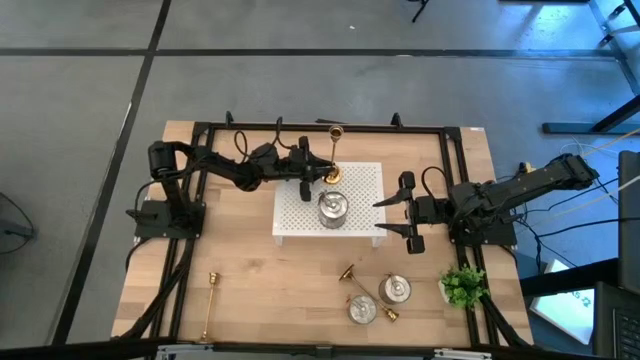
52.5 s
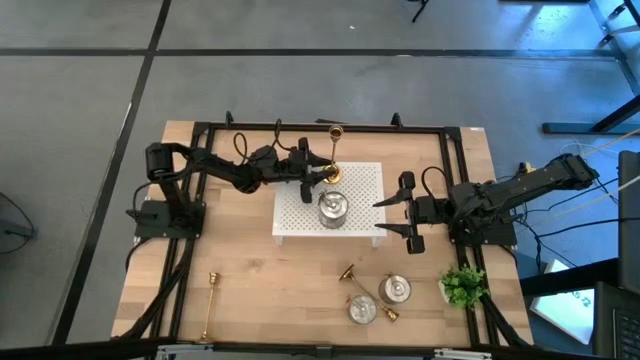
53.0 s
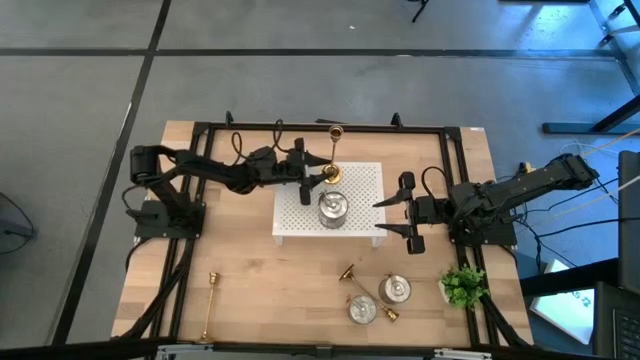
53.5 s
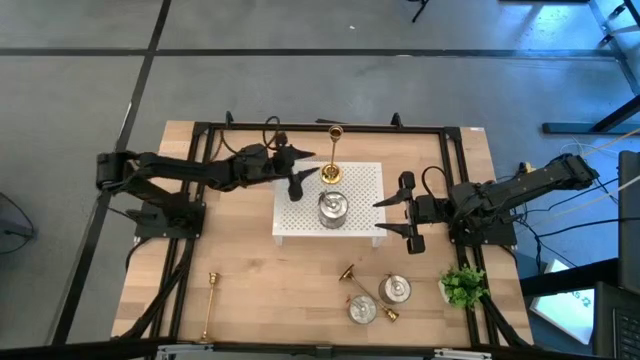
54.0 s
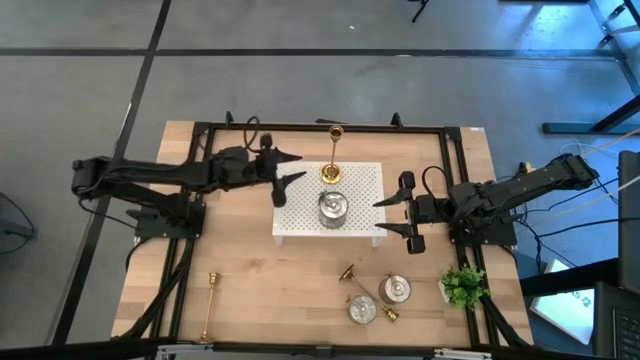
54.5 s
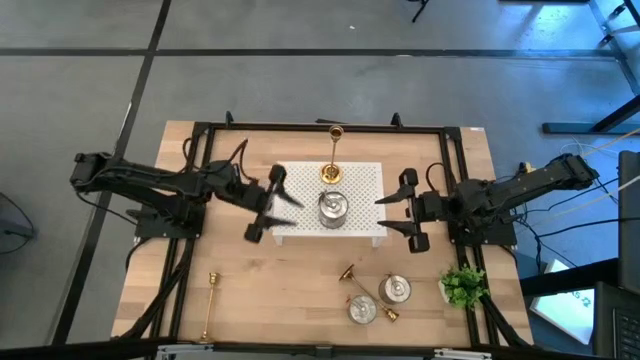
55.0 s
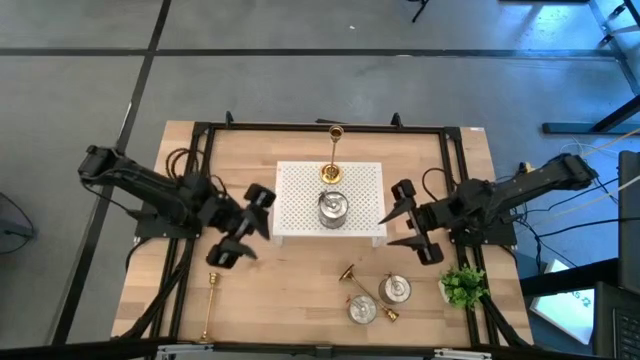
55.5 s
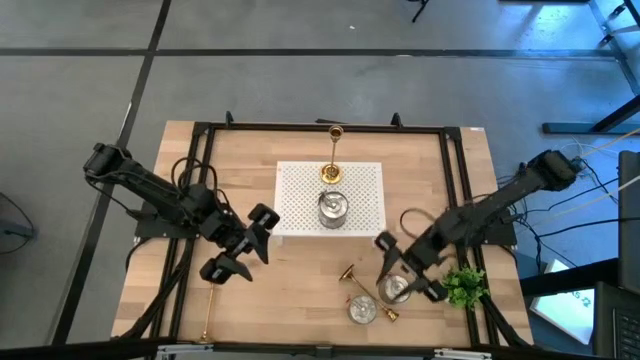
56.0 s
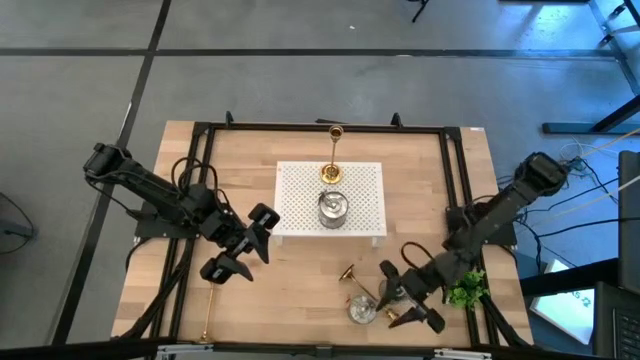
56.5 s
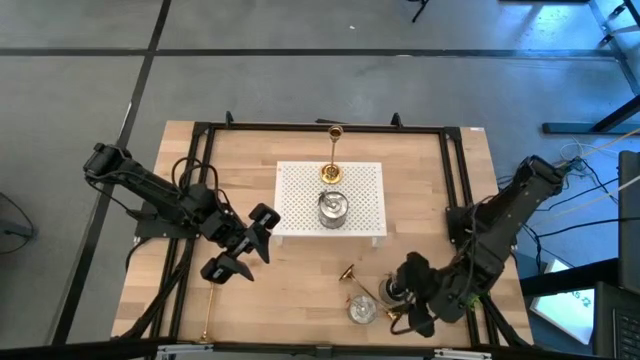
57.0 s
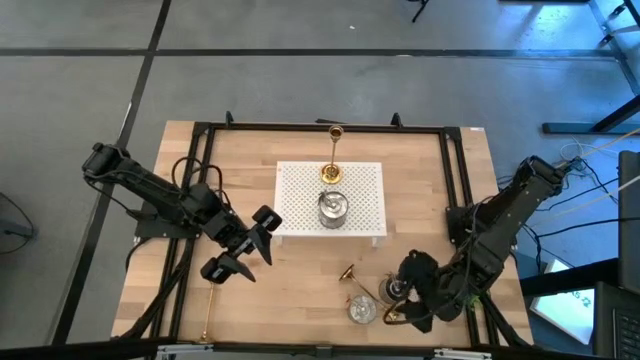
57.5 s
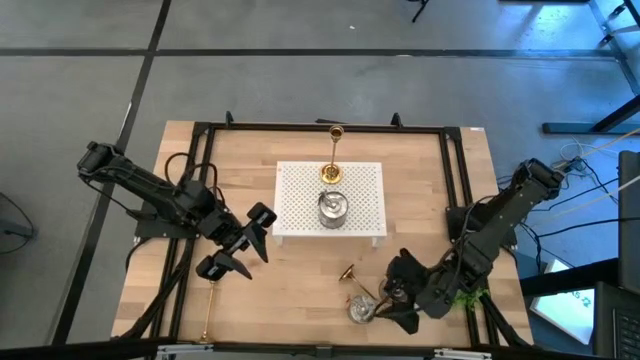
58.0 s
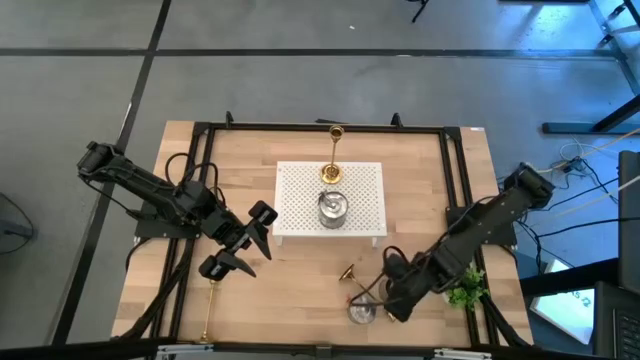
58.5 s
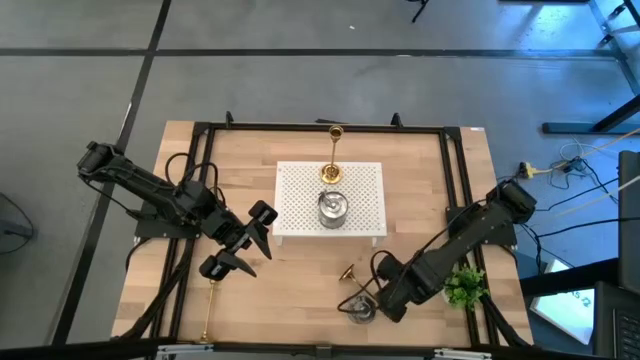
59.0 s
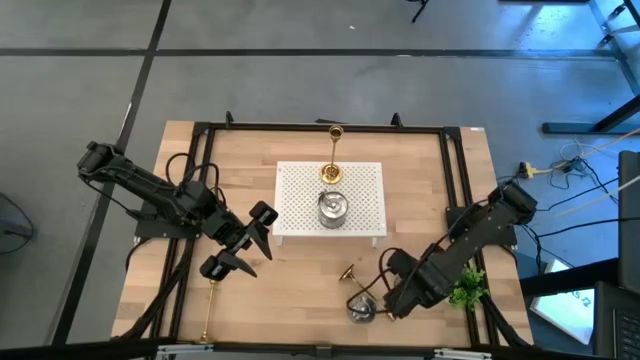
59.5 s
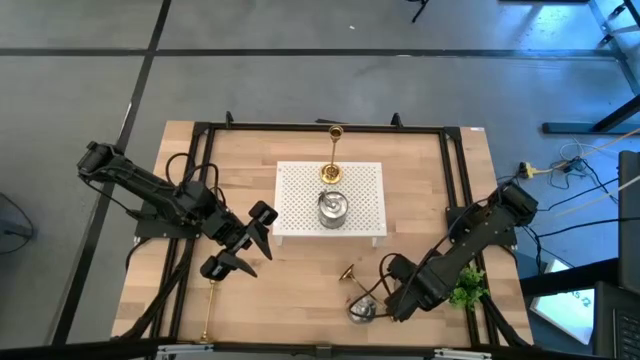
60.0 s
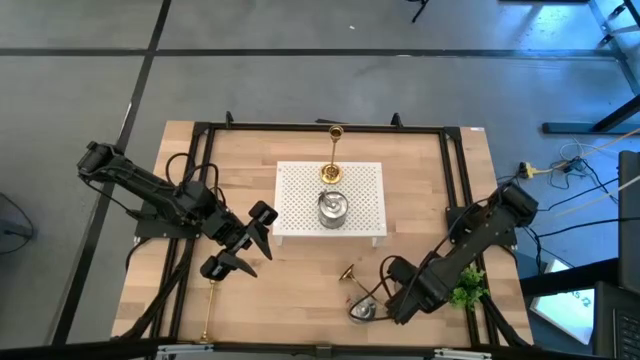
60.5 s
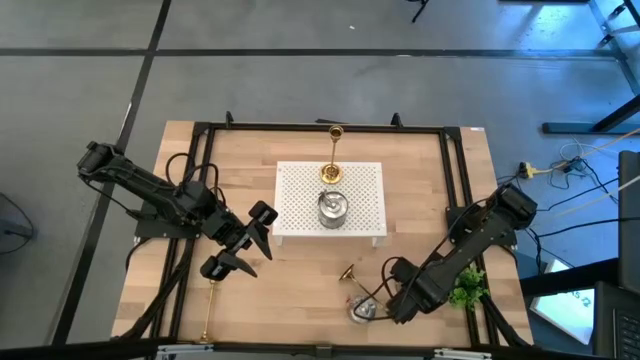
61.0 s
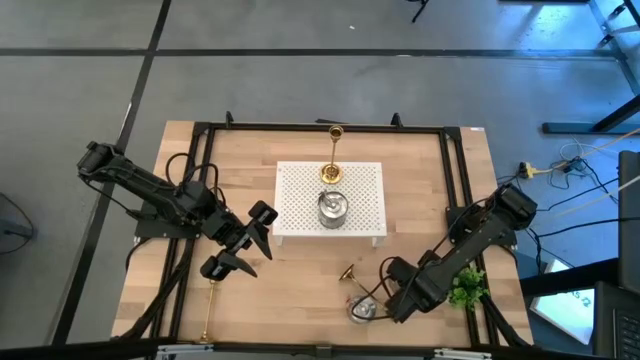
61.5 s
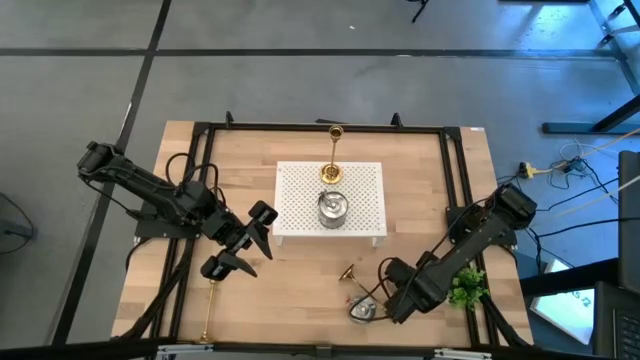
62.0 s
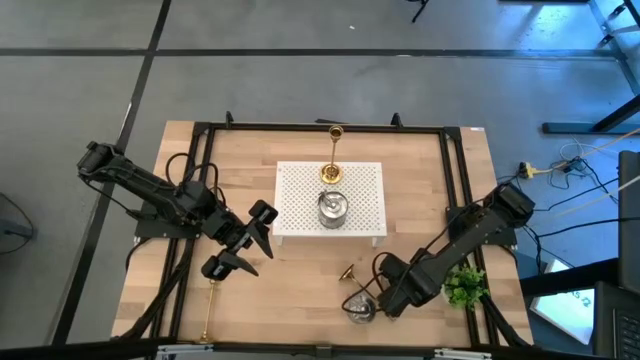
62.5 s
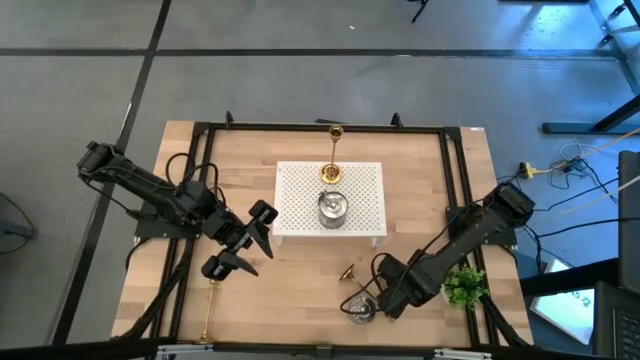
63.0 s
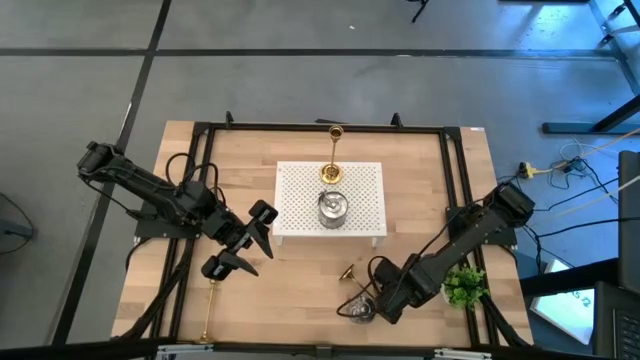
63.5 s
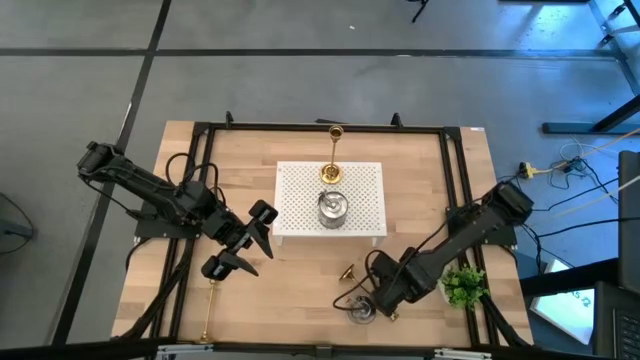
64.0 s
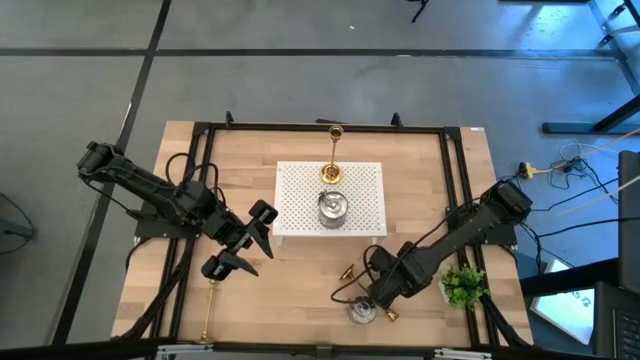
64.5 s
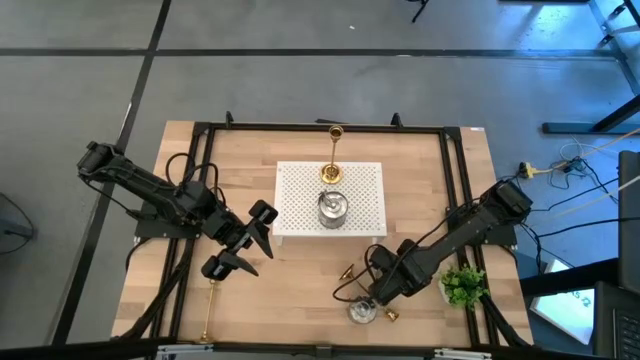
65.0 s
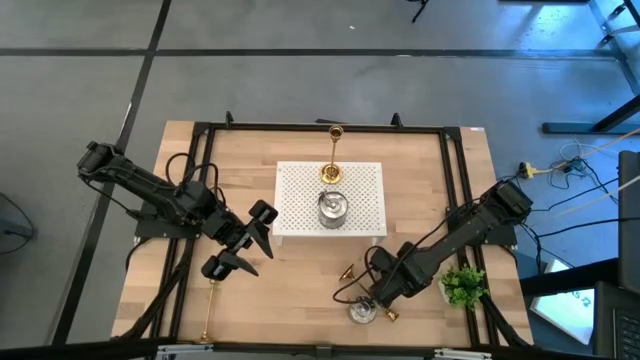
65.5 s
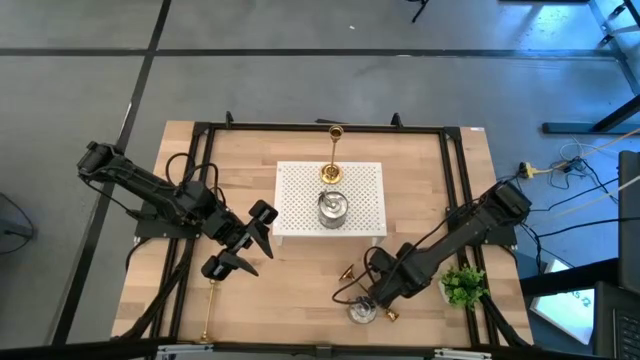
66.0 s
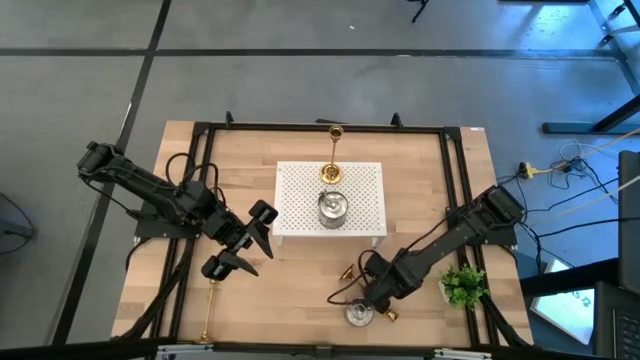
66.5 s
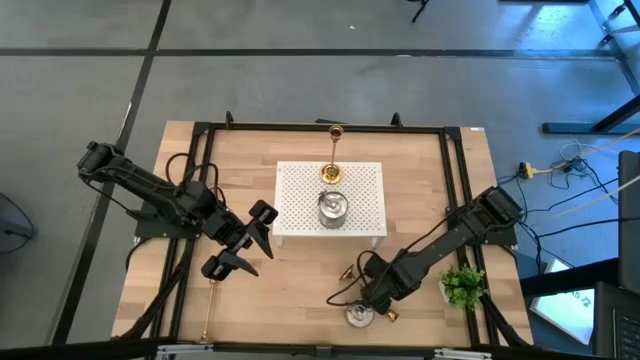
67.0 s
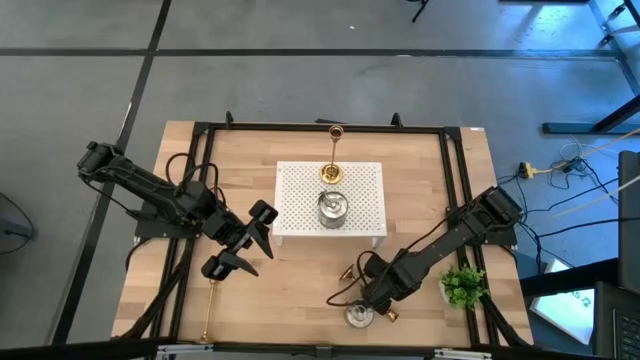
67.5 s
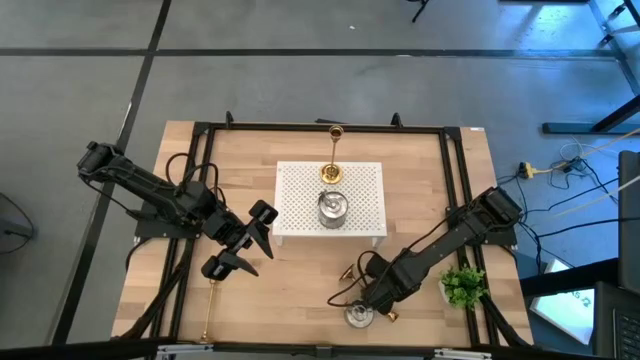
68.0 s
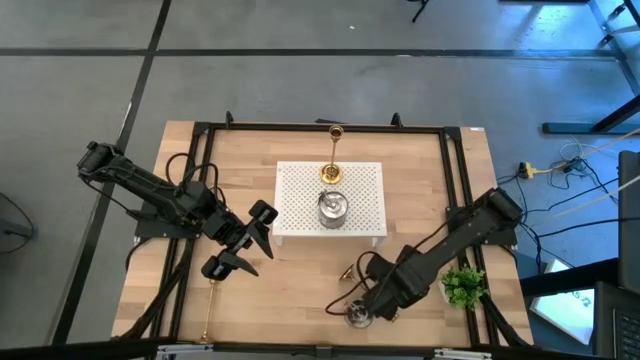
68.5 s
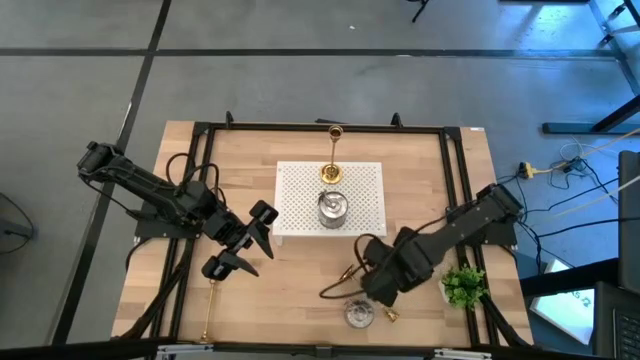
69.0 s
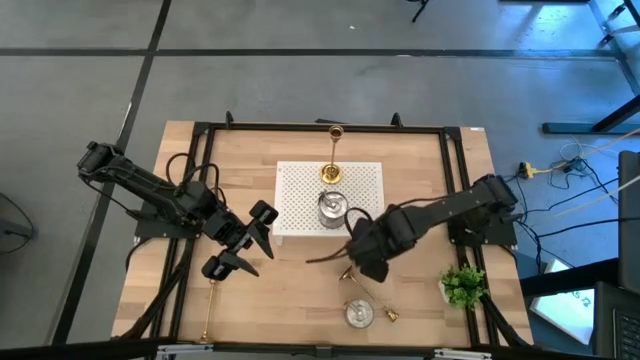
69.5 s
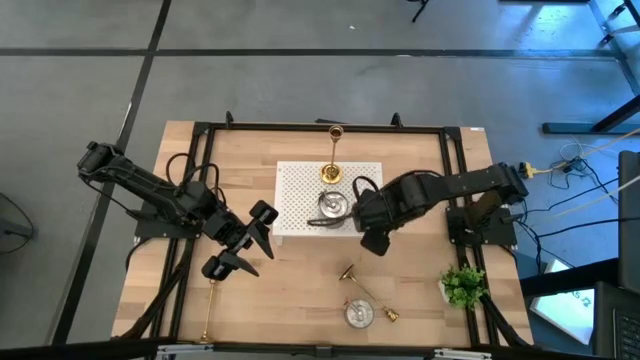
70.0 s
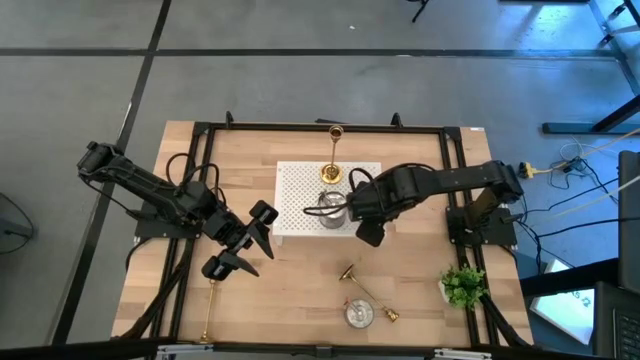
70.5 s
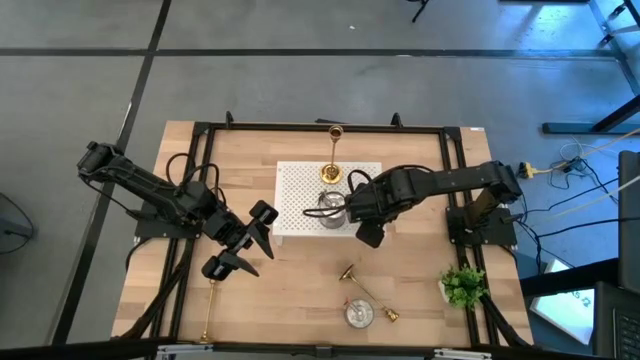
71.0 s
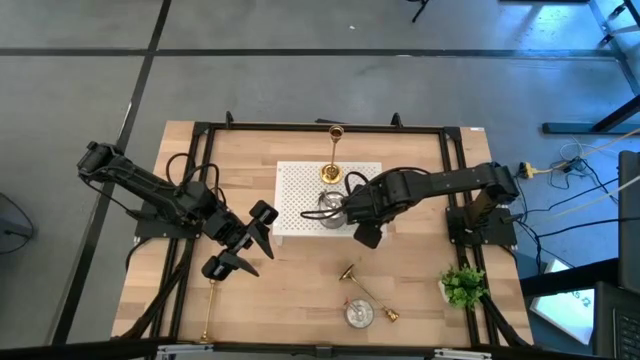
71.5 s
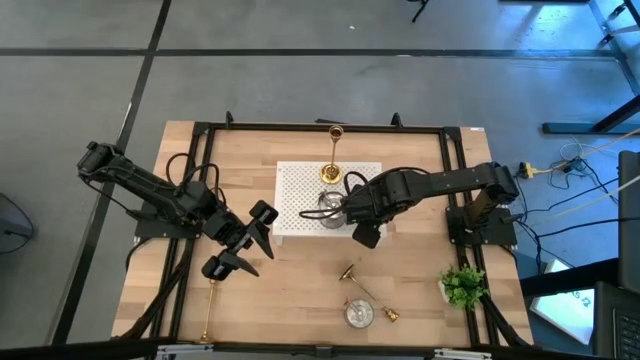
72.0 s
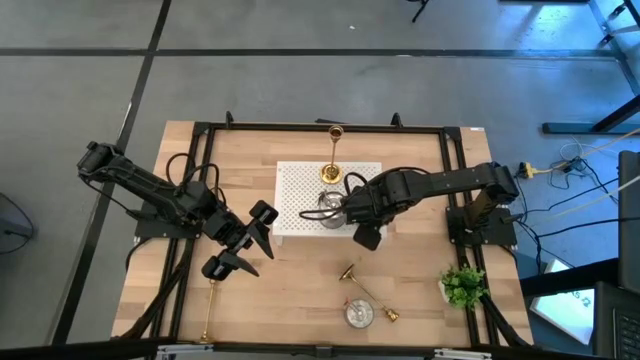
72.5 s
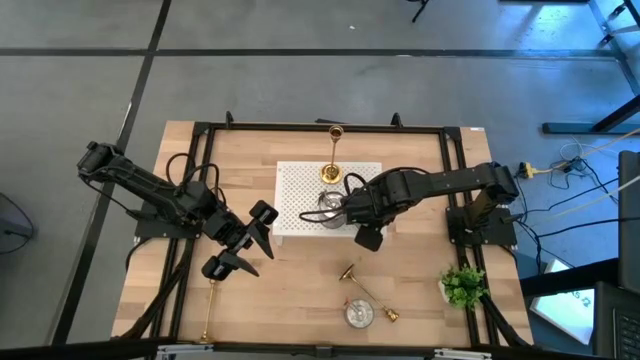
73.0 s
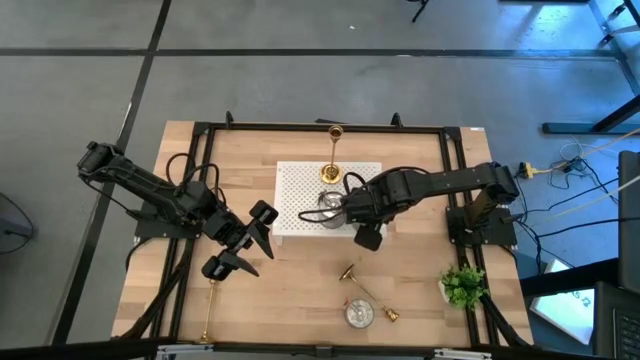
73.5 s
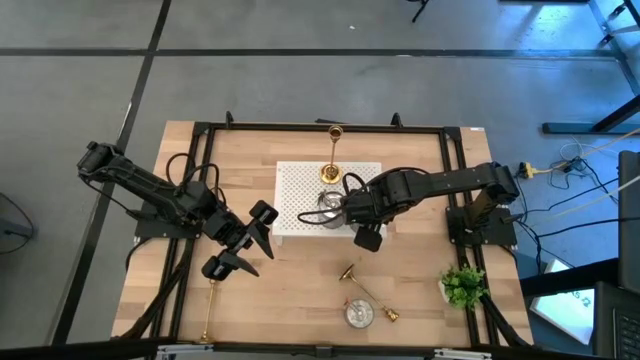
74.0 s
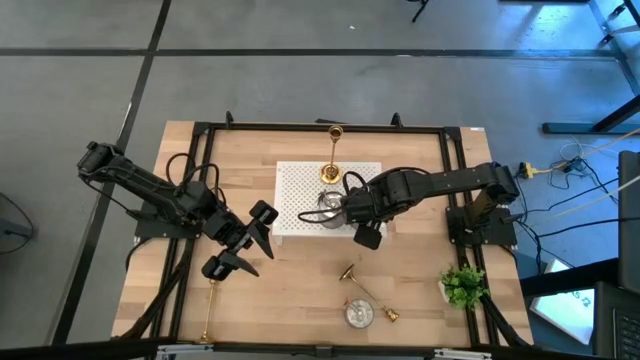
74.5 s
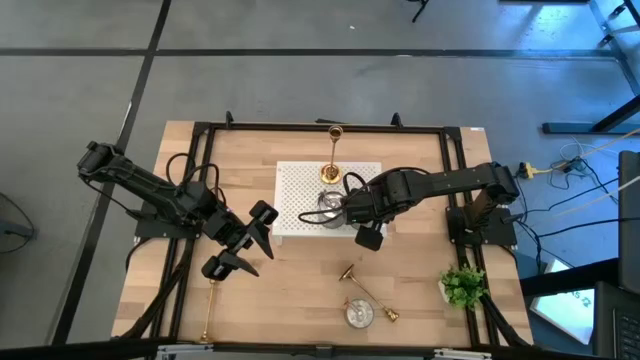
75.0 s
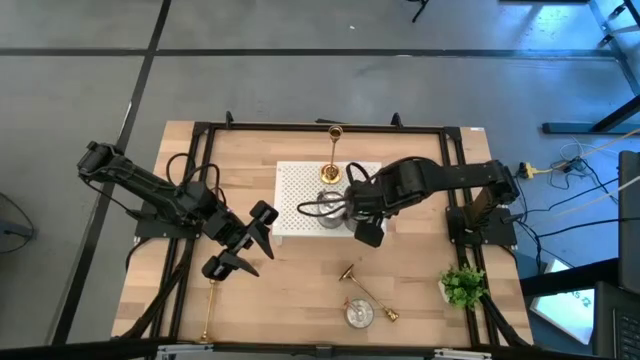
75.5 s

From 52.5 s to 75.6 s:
Task: Pick & Place candle stick holders
Put the top silver scented candle on the shelf aligned with the other silver scented candle
